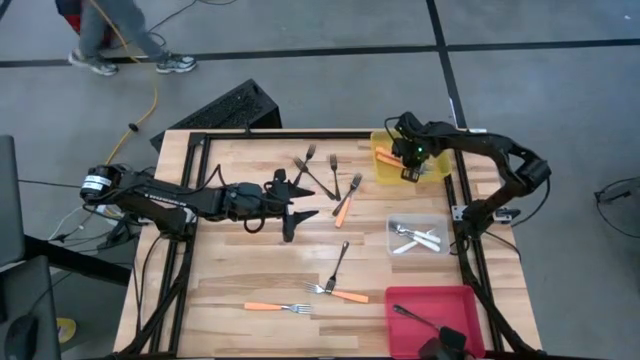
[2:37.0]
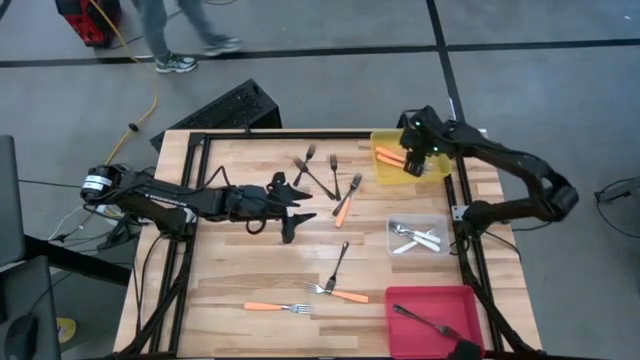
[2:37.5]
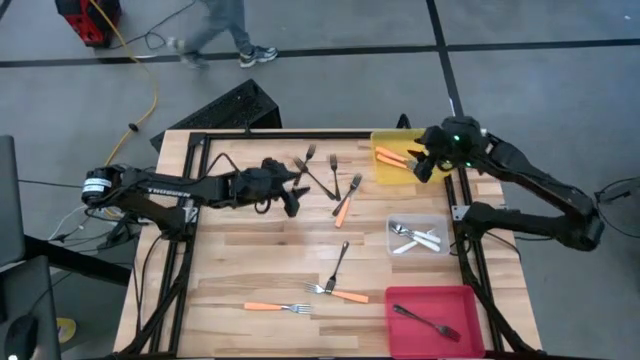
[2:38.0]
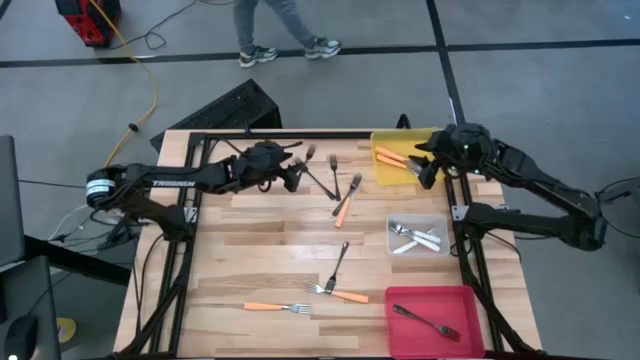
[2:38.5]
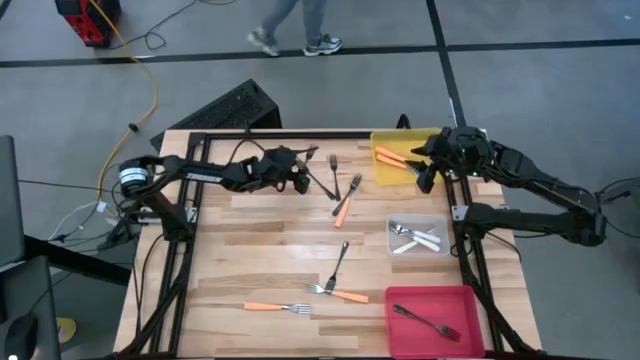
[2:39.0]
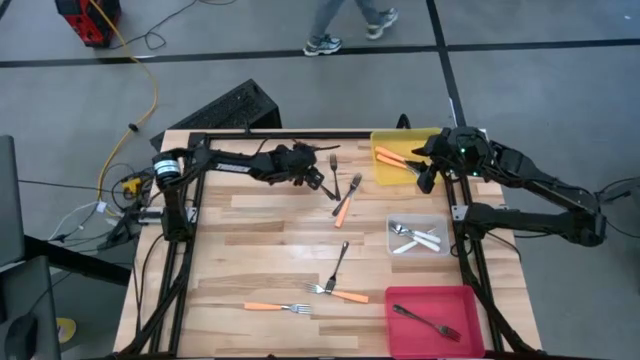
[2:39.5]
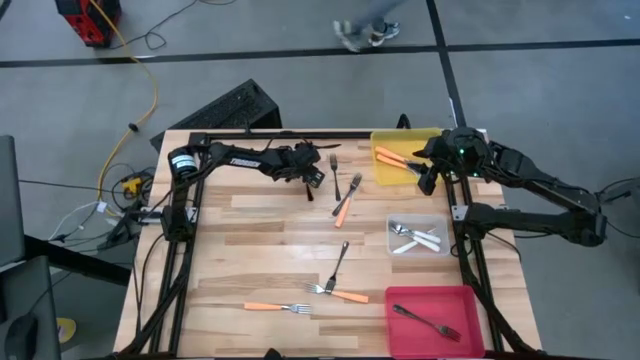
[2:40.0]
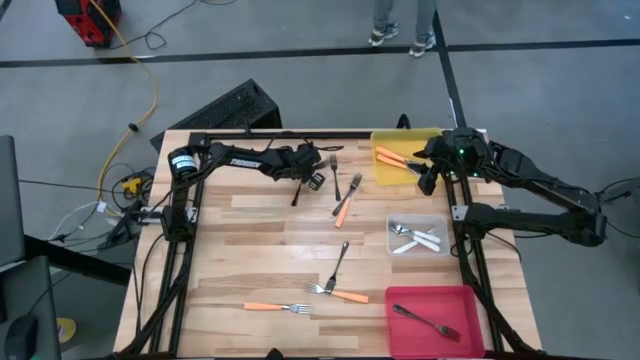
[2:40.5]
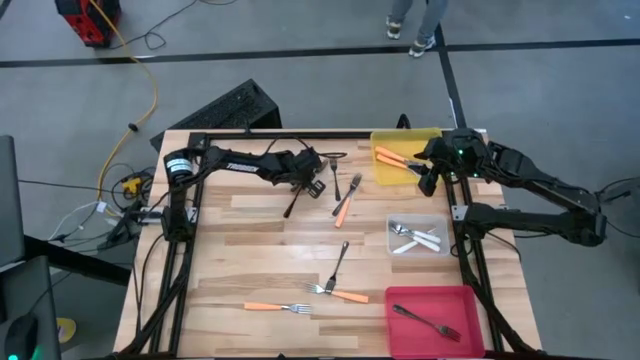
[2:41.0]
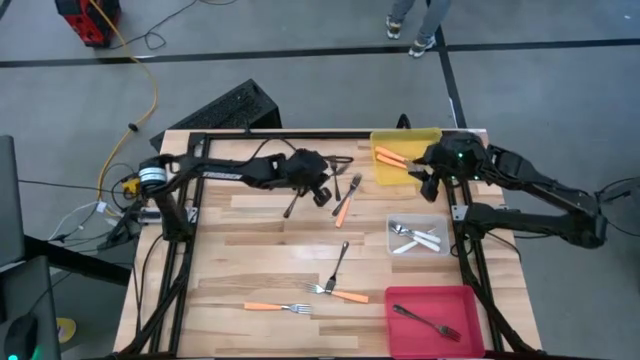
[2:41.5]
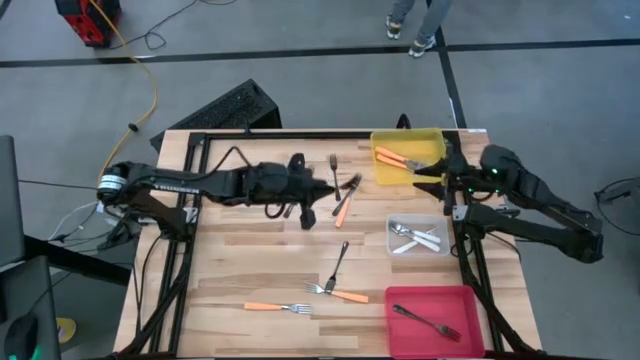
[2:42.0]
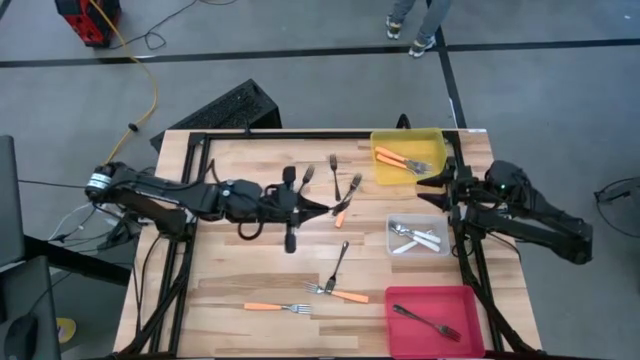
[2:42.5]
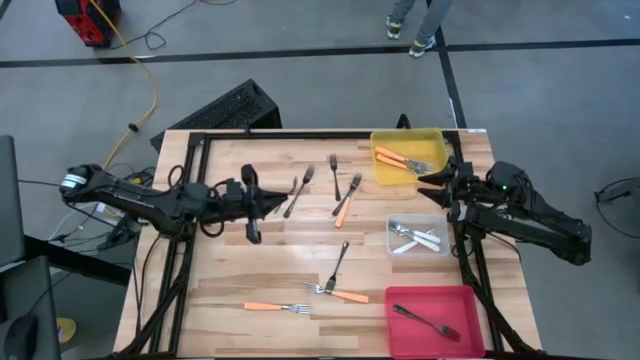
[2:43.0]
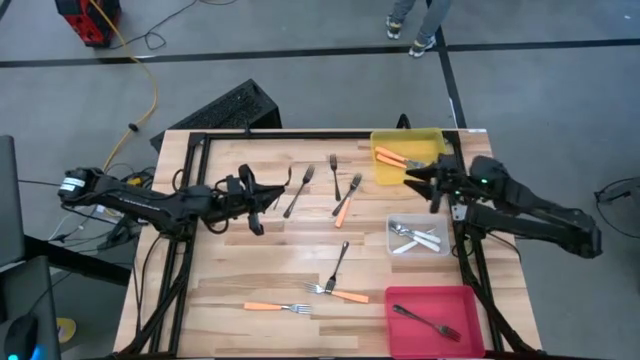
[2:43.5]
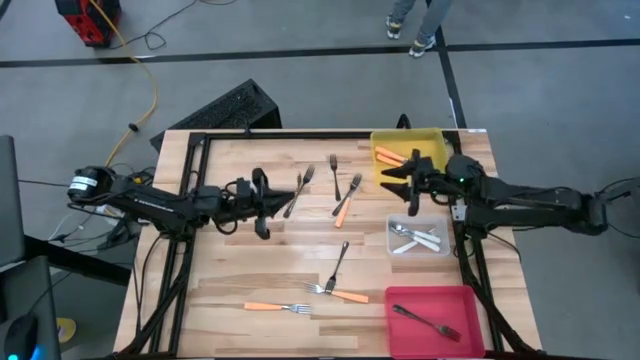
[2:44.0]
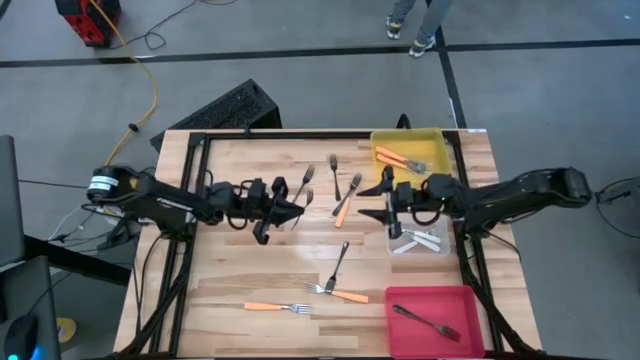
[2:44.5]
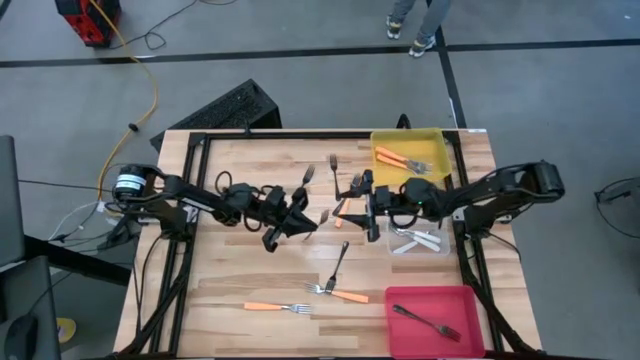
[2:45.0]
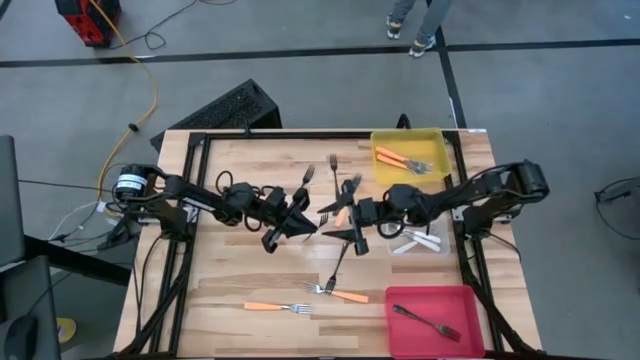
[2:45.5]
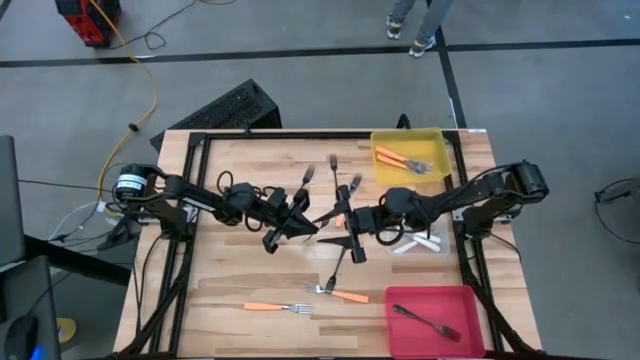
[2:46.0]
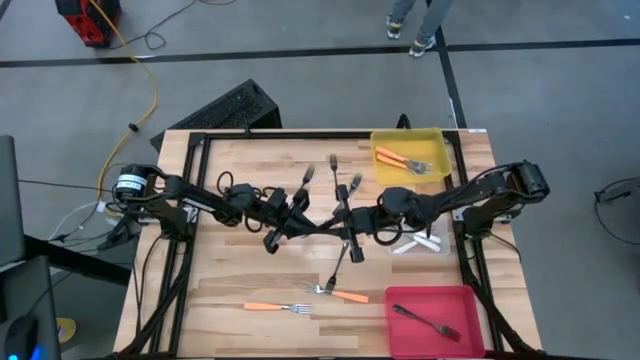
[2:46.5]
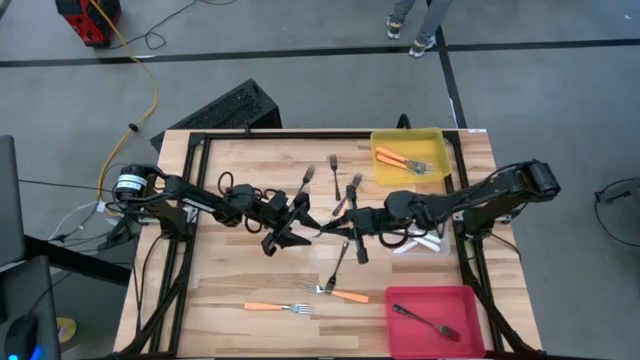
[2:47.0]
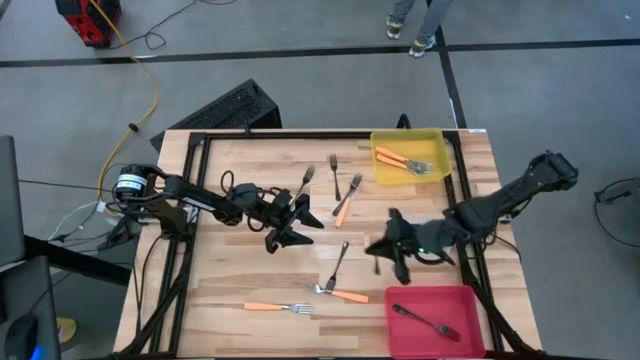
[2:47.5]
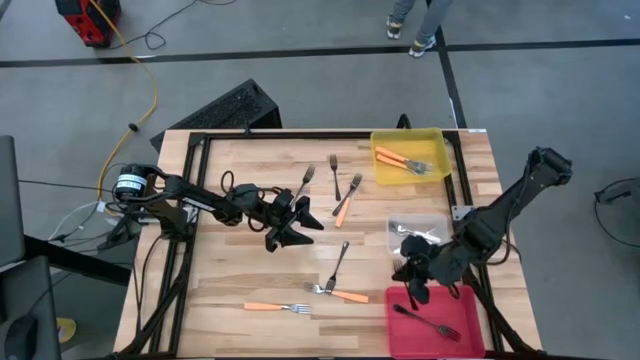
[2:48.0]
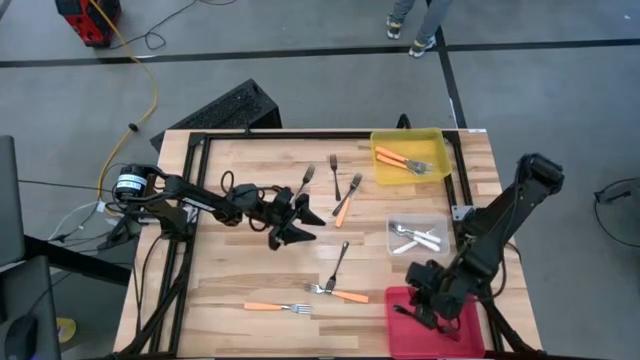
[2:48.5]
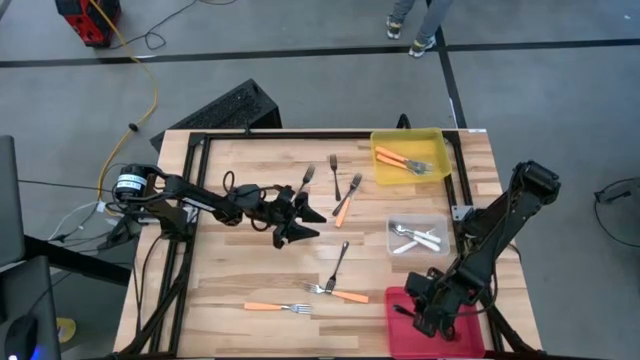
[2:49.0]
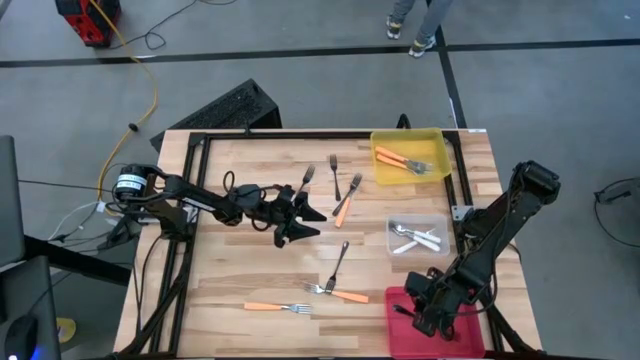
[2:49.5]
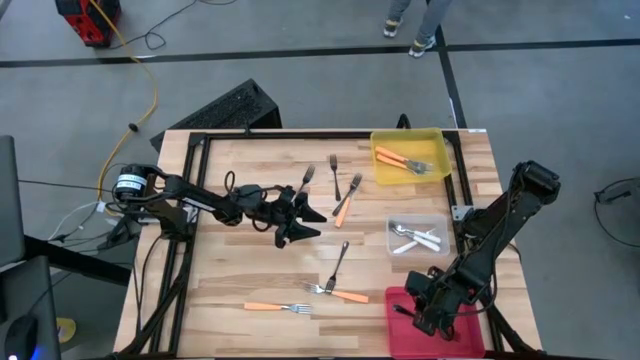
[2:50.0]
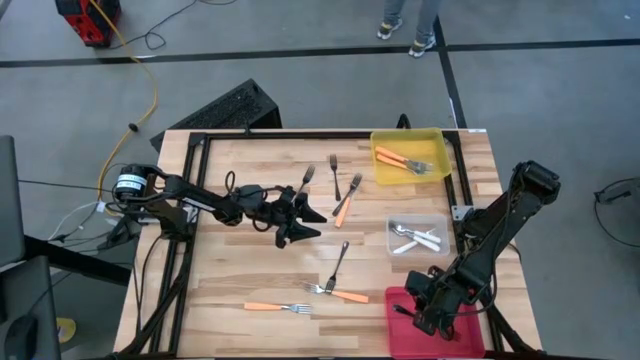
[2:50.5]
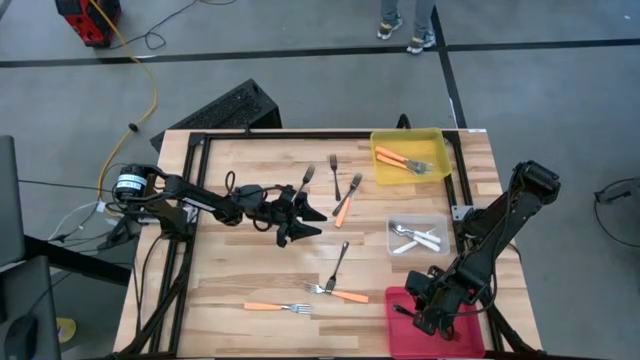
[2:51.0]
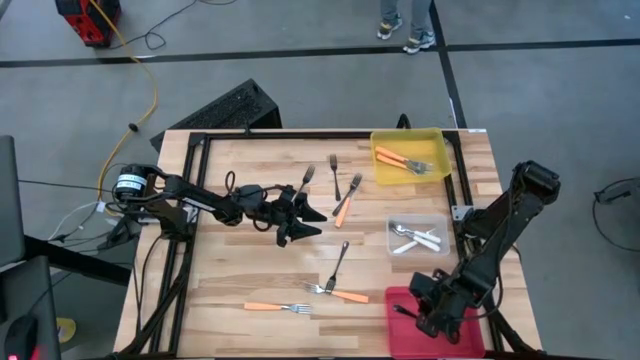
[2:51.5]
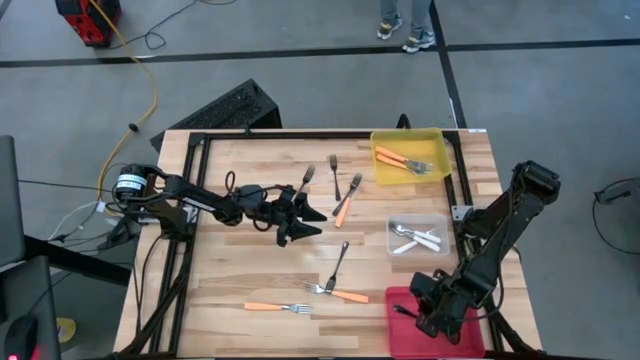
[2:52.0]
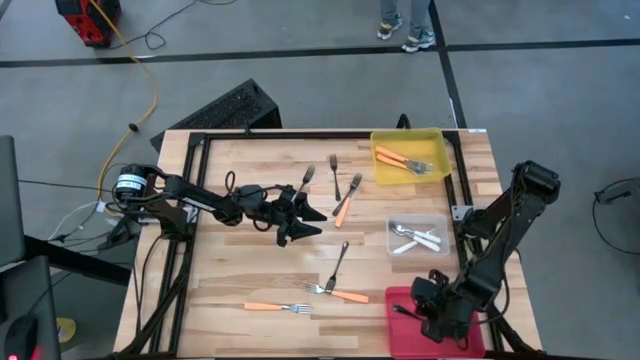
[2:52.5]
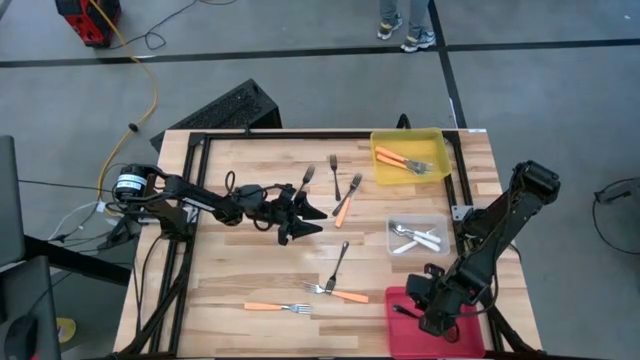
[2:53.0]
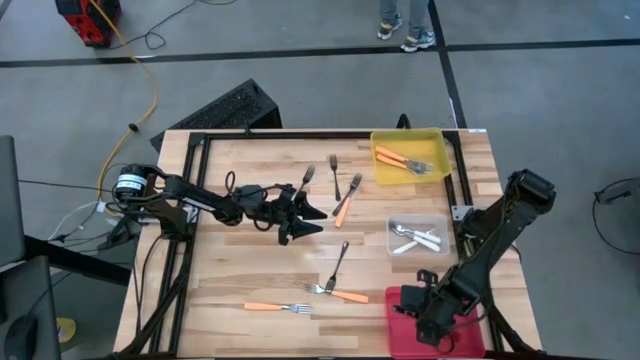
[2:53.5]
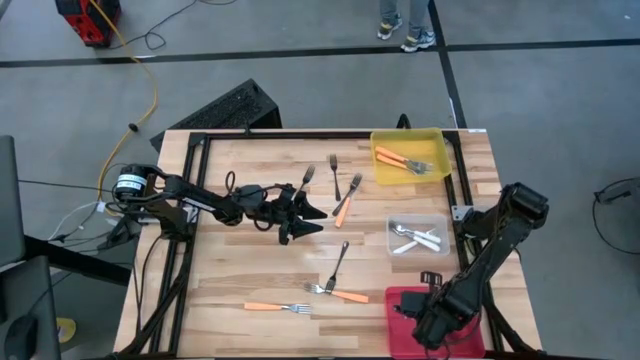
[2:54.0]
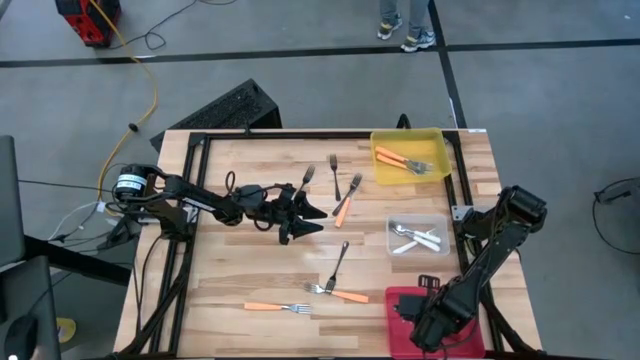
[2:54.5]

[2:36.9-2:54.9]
Task: Sort silverware by color (type)
Put the black fork into the red bin

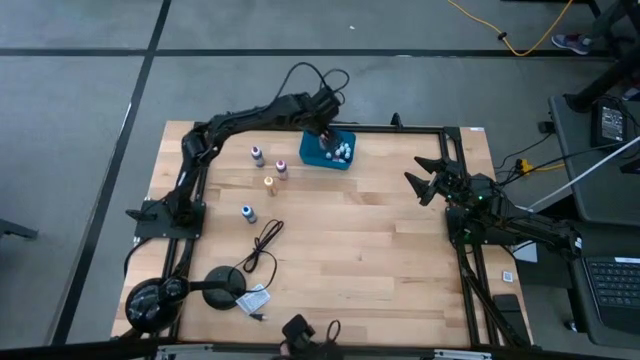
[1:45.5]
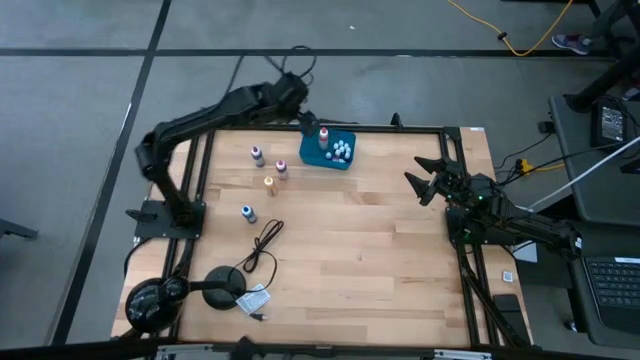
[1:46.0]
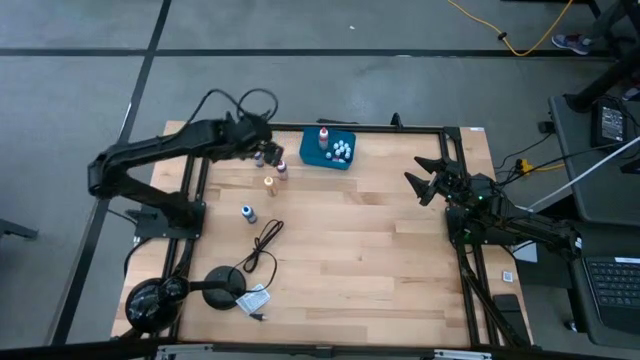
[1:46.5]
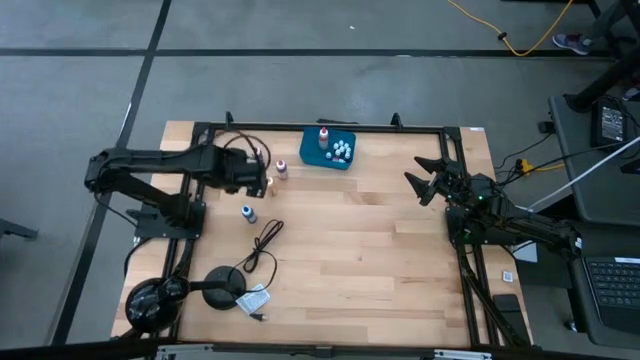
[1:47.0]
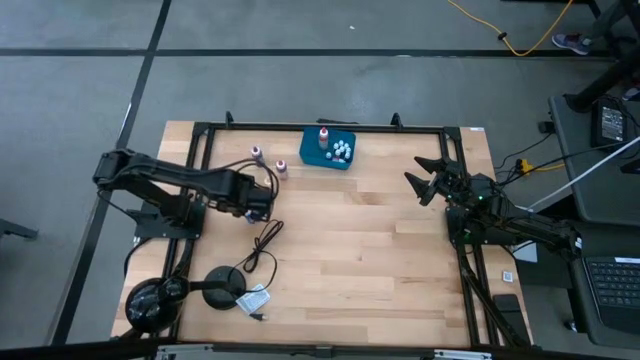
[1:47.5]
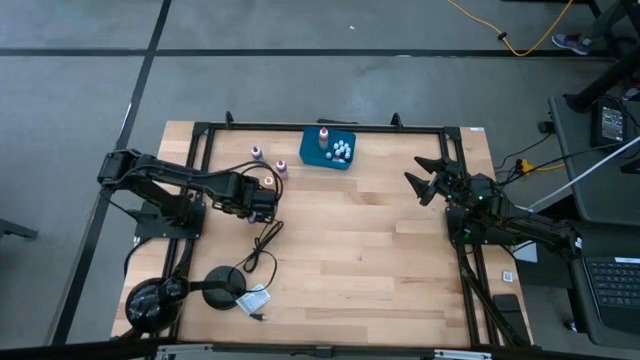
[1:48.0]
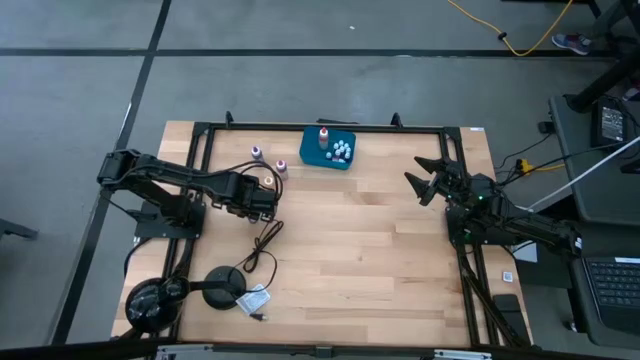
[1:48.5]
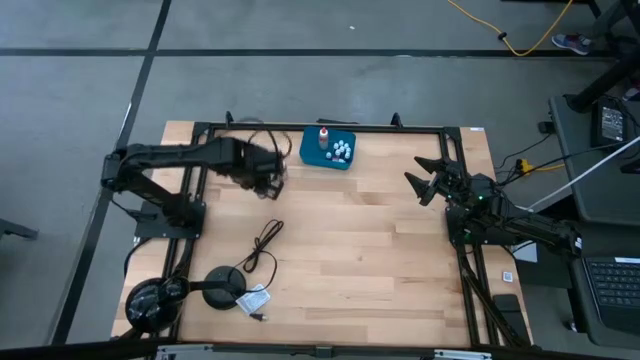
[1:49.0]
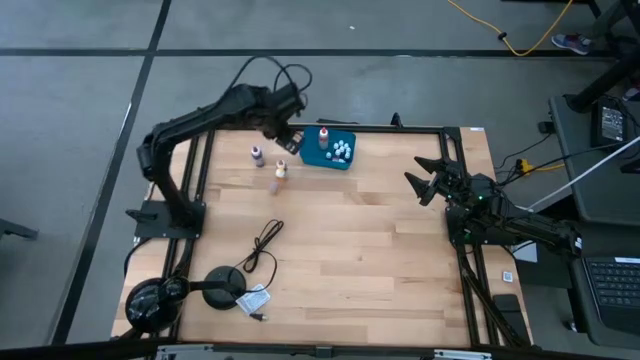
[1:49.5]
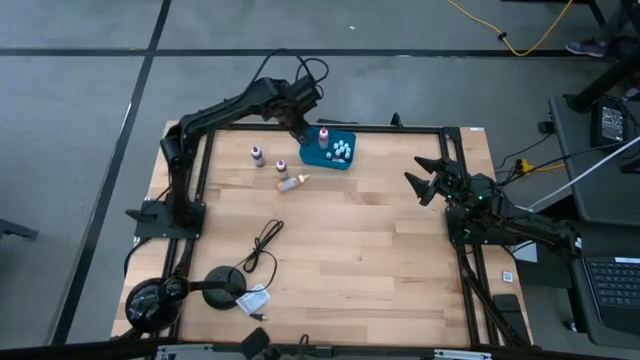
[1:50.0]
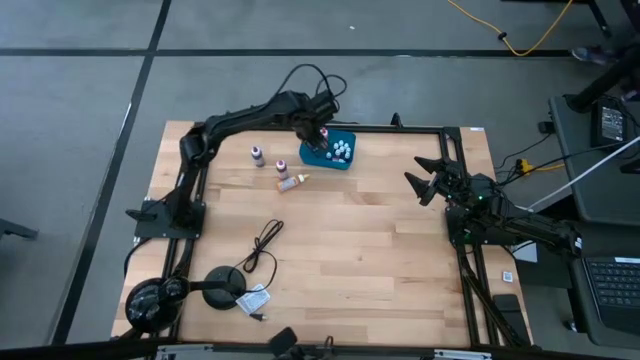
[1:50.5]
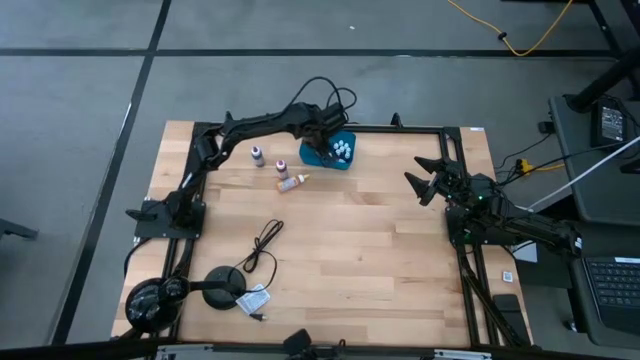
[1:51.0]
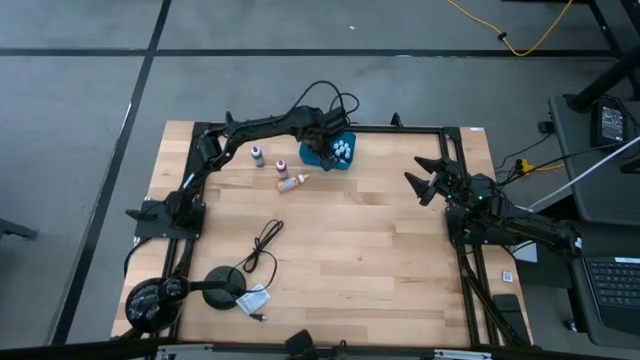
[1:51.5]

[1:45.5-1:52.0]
Task: Pick & Place food coloring
Put the large blue food coloring bottle into the blue container
